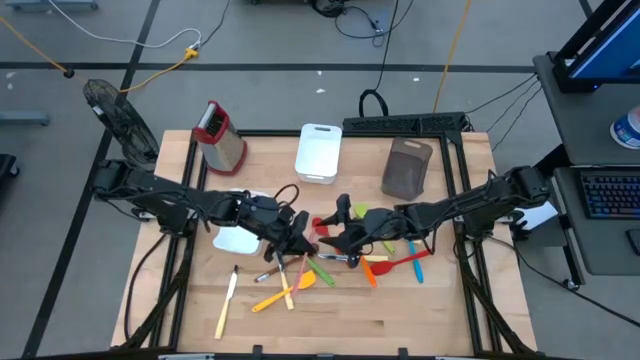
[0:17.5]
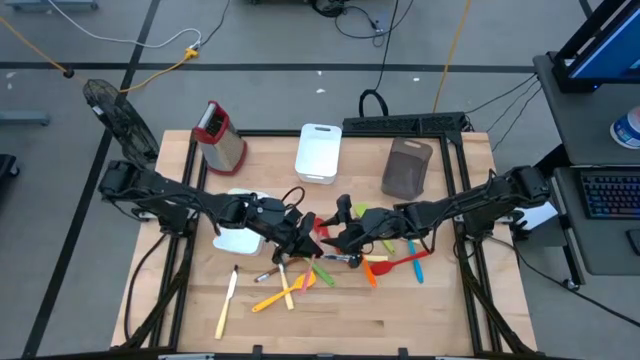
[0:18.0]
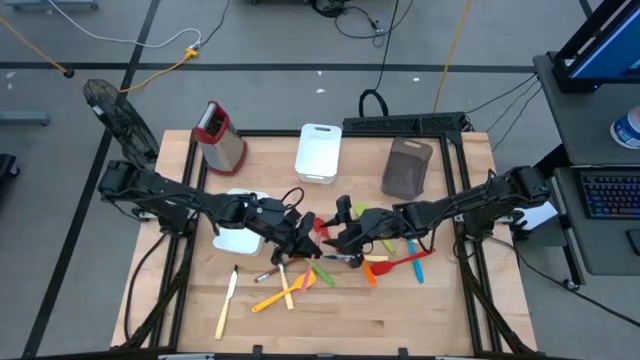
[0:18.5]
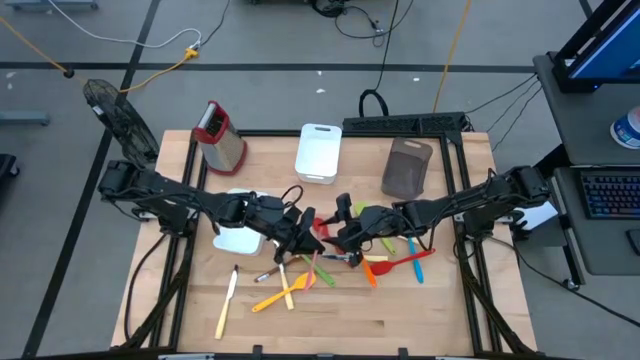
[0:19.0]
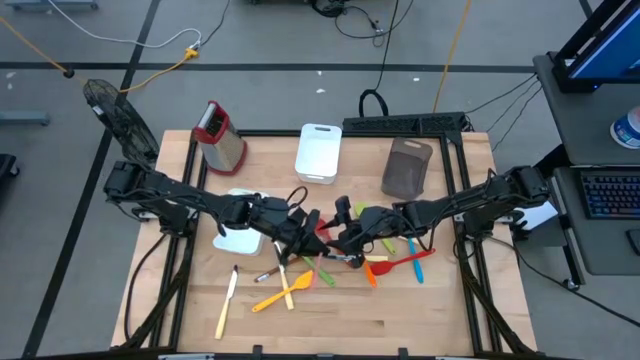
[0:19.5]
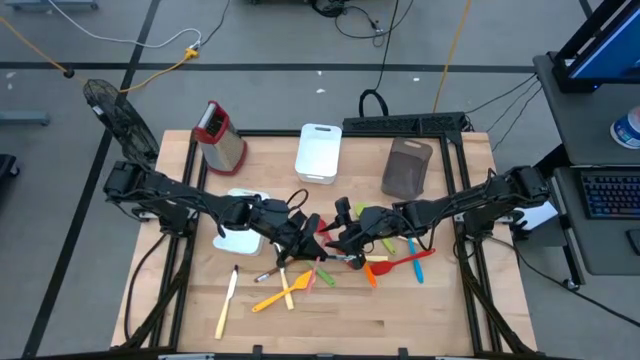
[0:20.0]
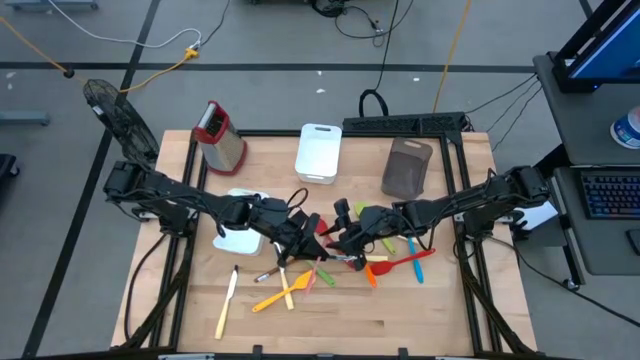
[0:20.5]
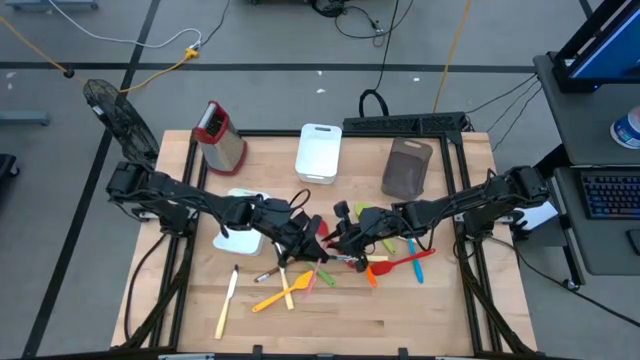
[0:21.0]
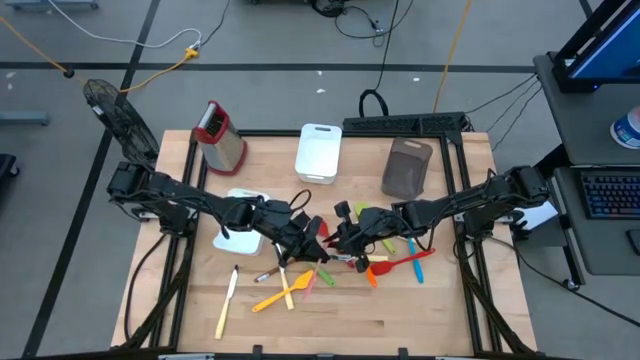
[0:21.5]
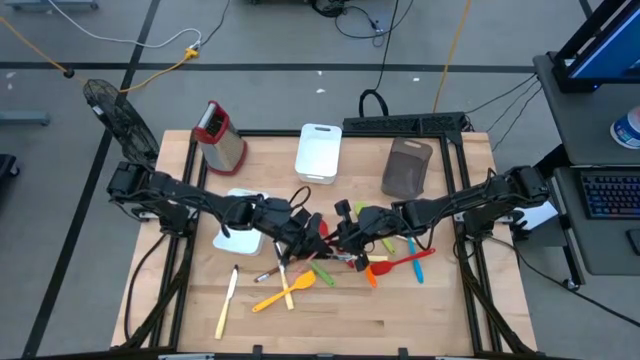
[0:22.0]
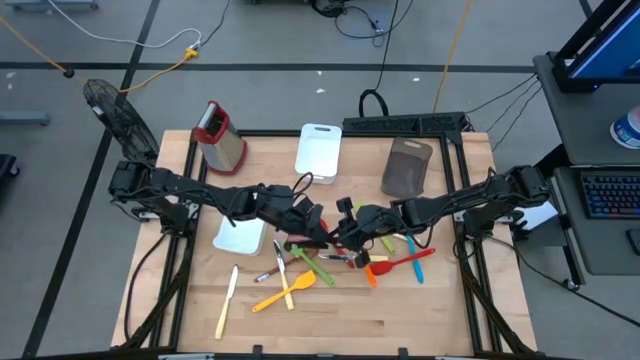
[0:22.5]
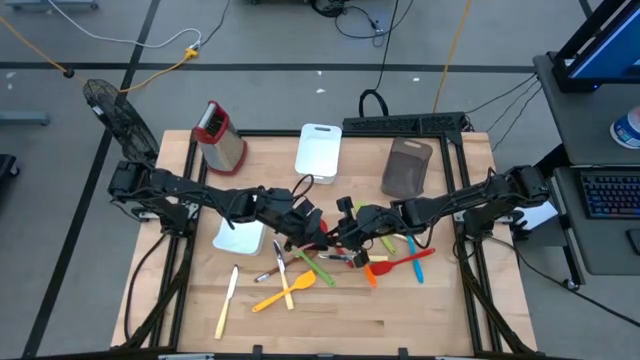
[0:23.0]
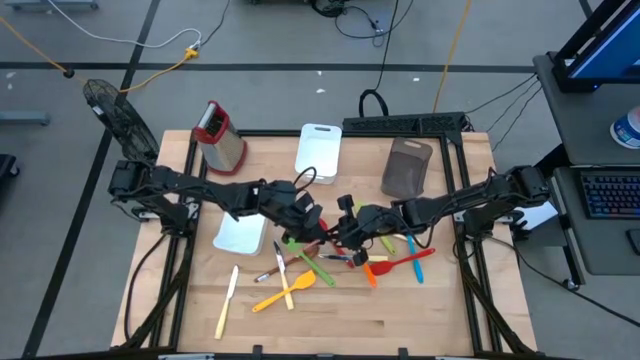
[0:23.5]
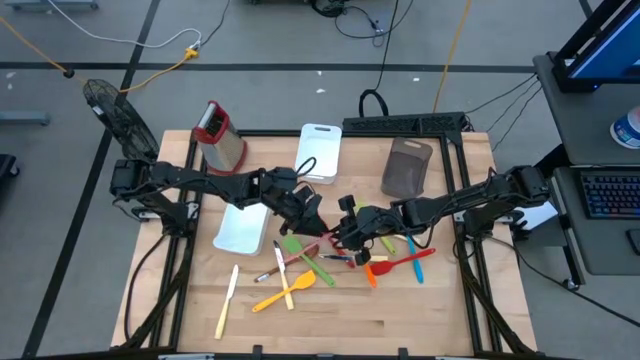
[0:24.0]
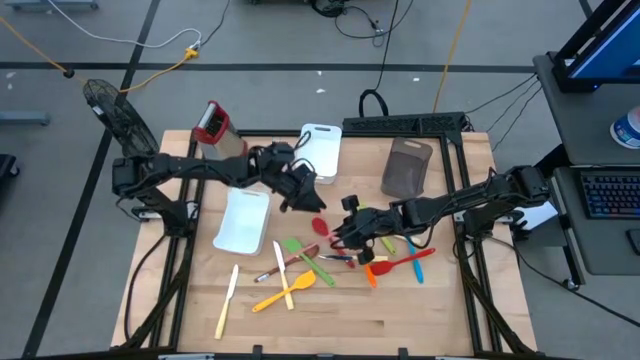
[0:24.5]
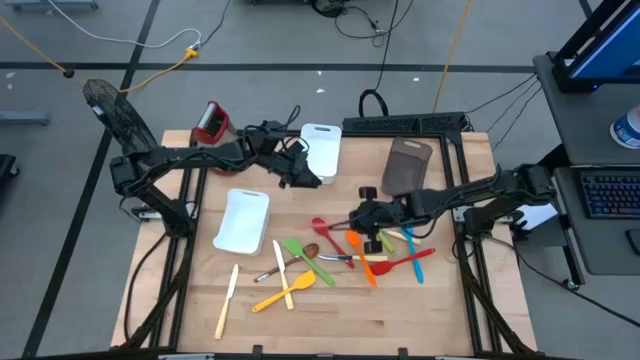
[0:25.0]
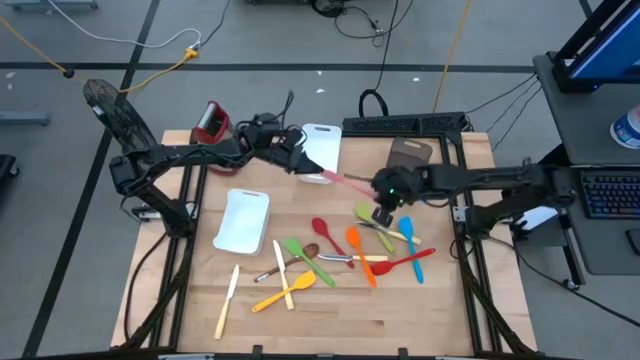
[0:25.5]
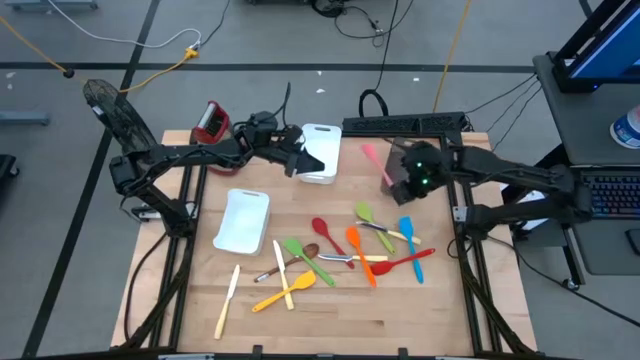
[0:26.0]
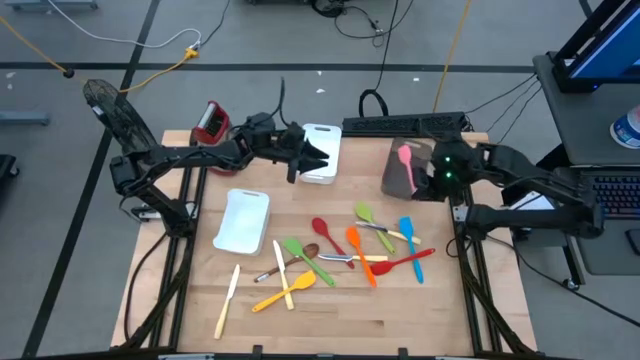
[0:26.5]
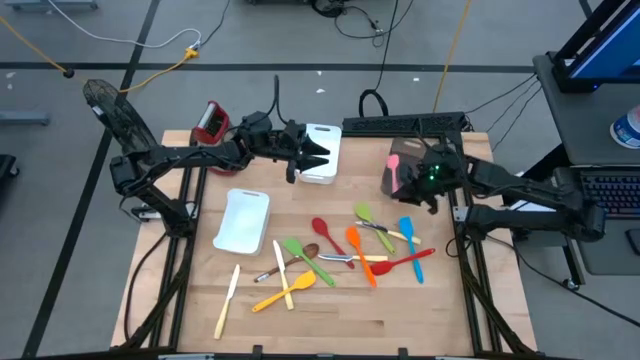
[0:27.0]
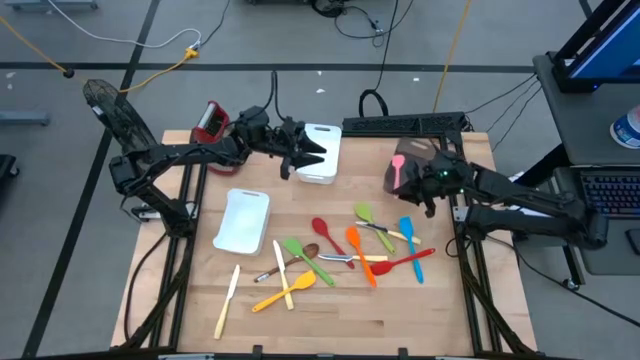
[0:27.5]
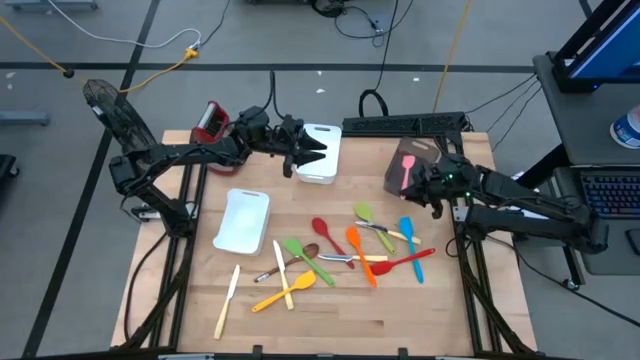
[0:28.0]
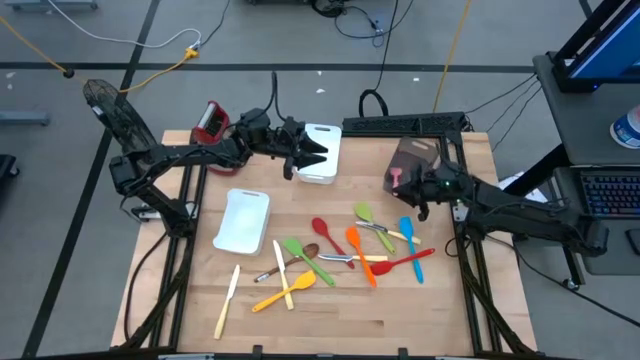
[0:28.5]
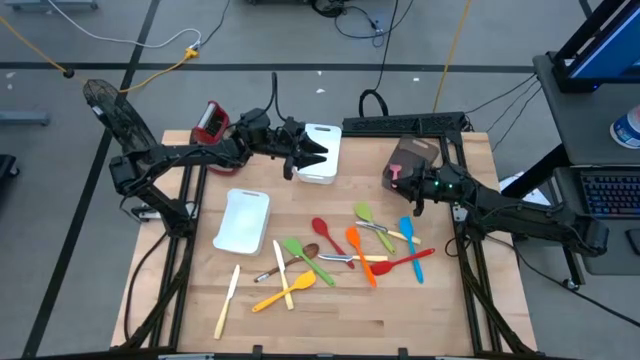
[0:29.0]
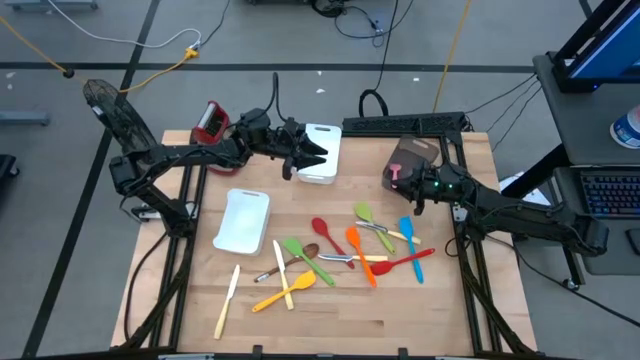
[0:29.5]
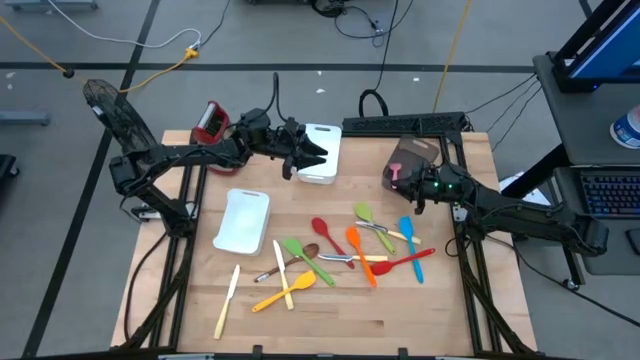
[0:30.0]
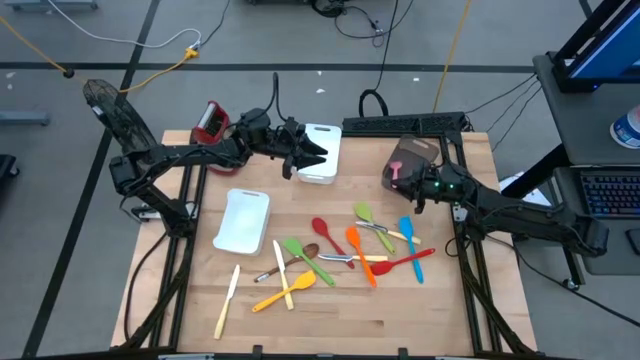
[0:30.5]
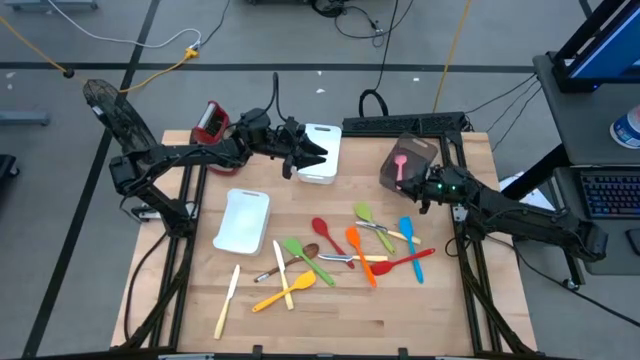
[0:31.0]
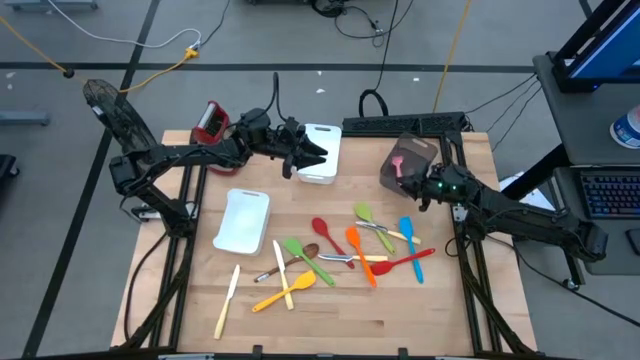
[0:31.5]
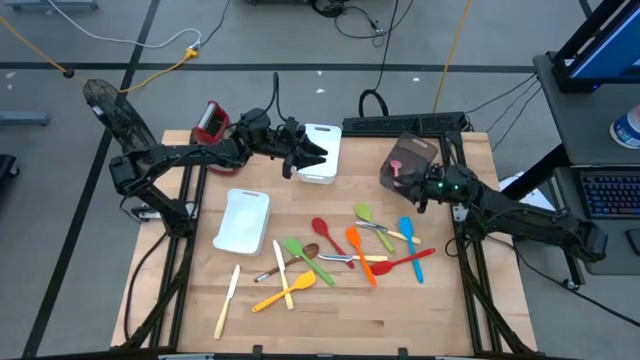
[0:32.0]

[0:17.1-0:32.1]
Task: Pick & Place Kitchen Items
Put the pink spatula into the black bin

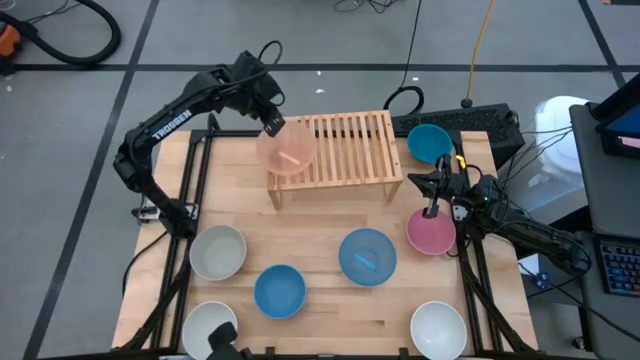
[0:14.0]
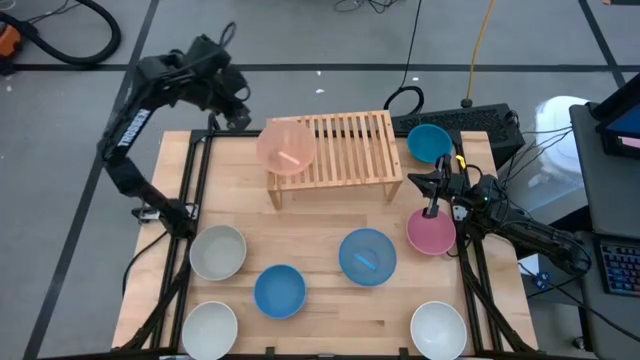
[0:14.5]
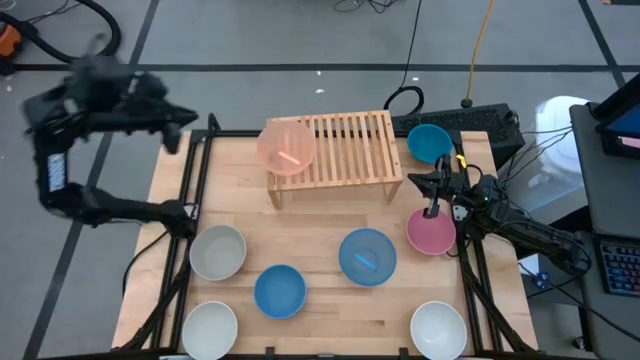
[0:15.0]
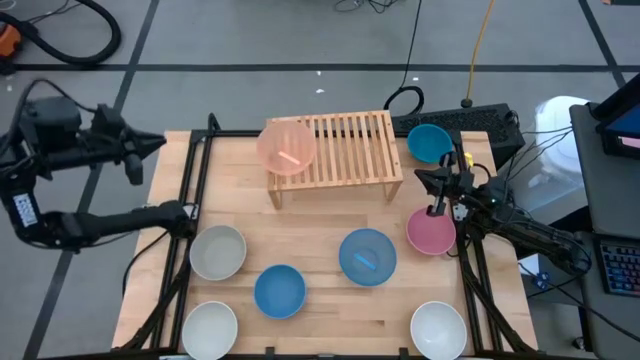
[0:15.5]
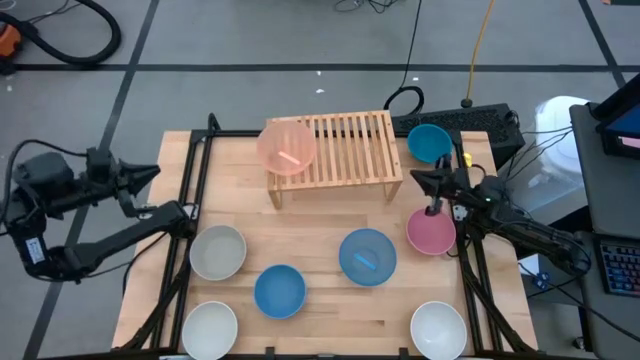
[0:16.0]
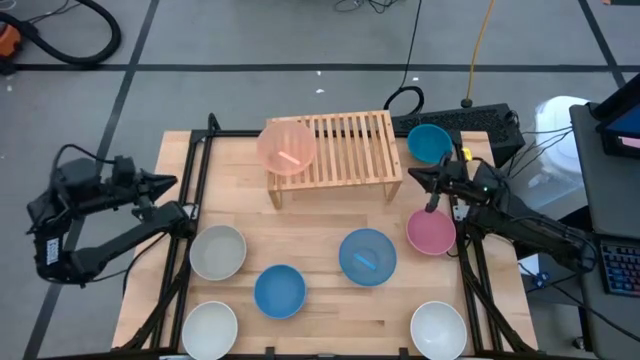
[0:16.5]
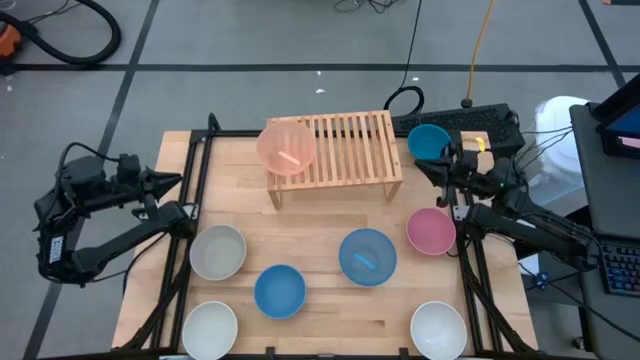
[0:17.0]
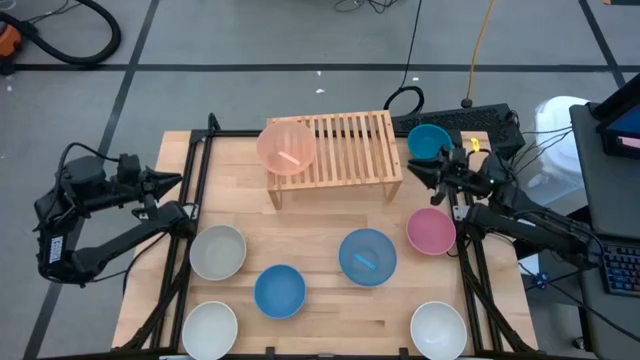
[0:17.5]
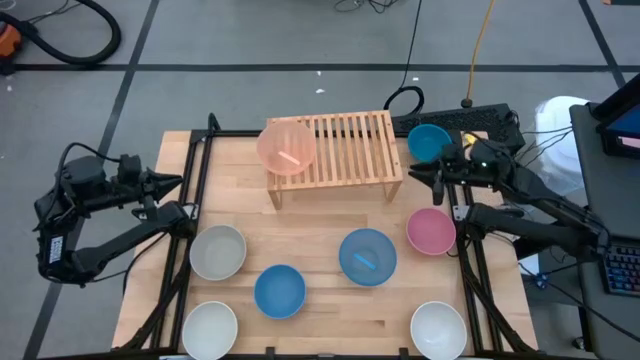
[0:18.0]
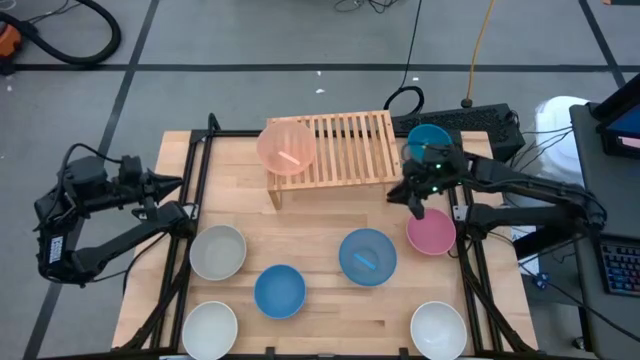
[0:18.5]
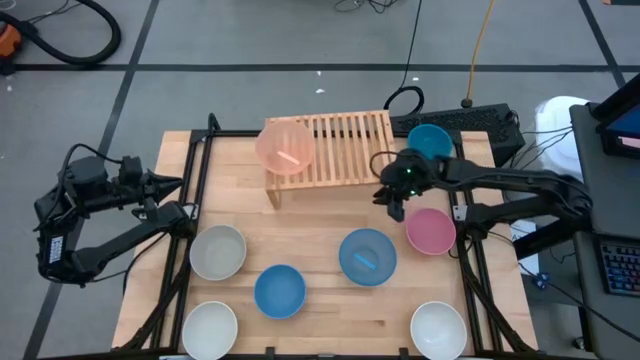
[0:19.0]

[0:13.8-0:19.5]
Task: Place and stack bowls onto a shelf
Adjust the shelf on the table
